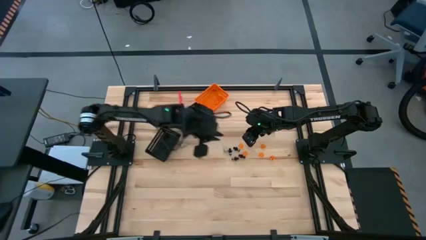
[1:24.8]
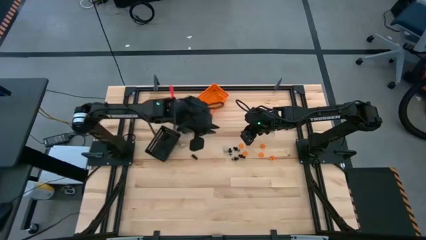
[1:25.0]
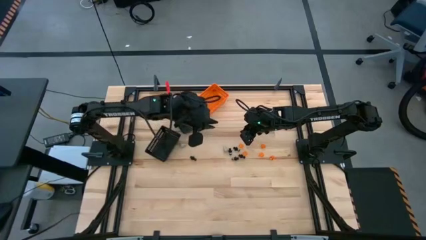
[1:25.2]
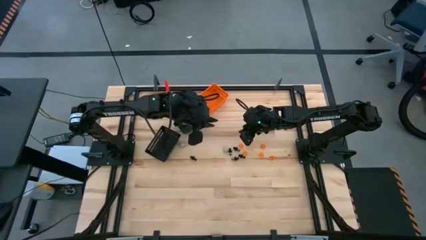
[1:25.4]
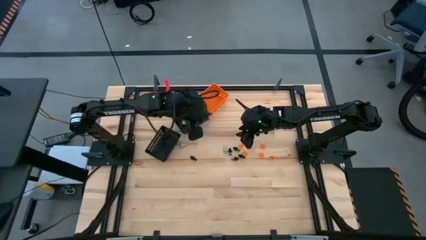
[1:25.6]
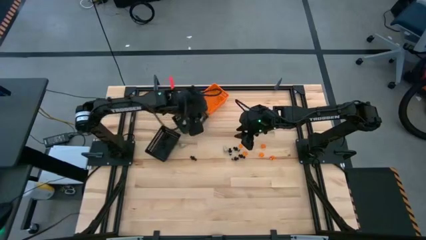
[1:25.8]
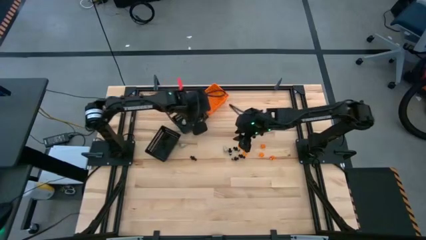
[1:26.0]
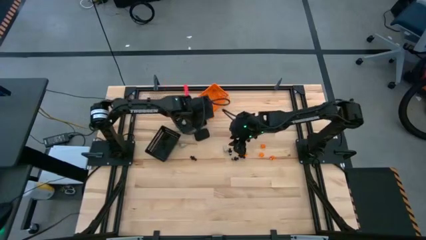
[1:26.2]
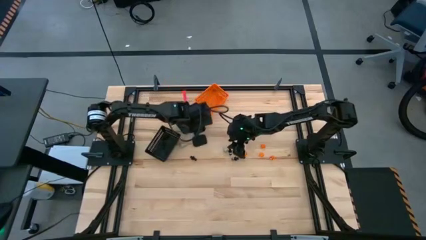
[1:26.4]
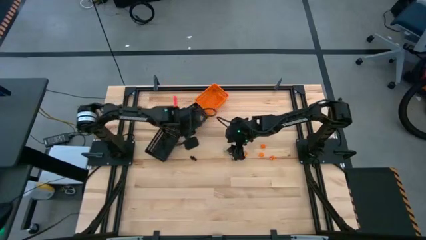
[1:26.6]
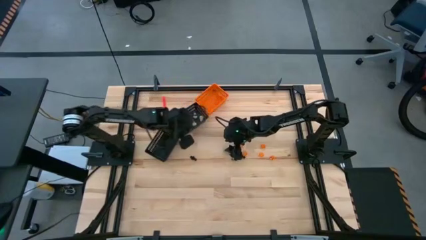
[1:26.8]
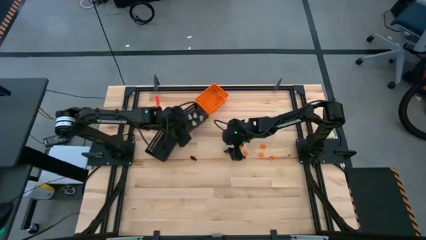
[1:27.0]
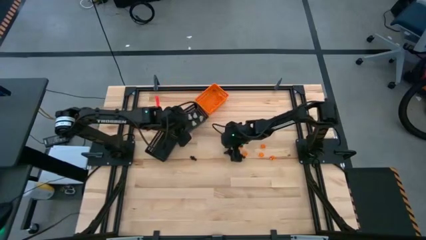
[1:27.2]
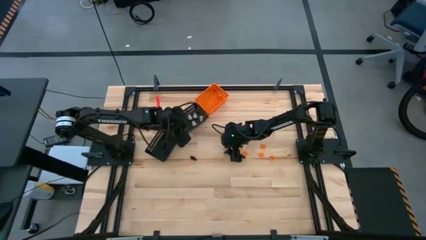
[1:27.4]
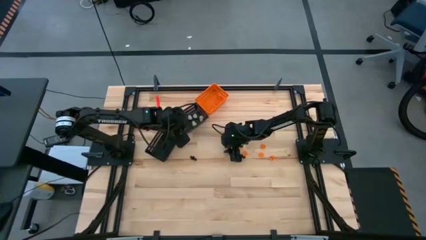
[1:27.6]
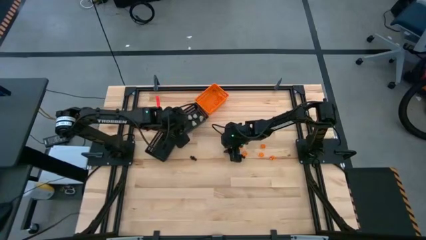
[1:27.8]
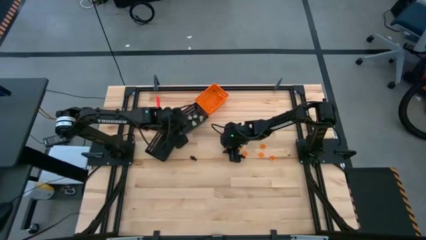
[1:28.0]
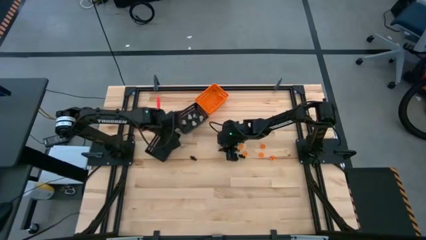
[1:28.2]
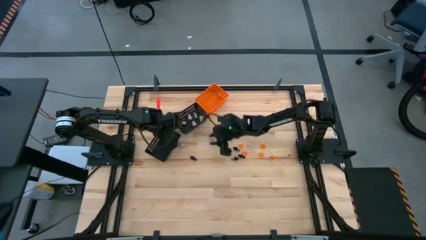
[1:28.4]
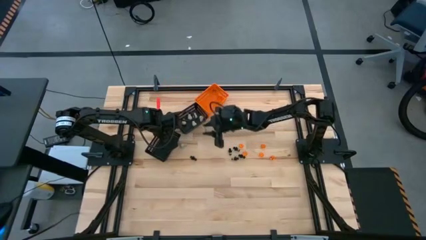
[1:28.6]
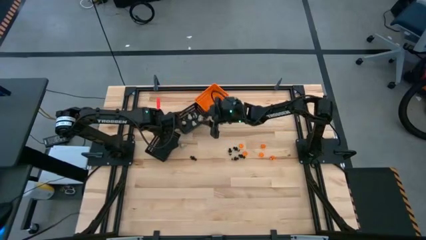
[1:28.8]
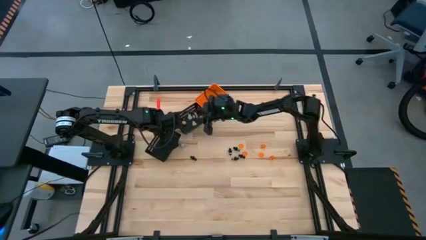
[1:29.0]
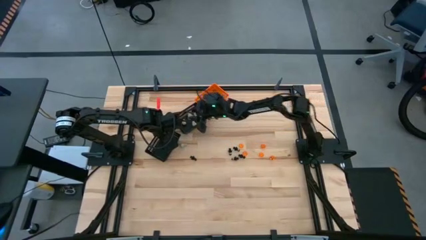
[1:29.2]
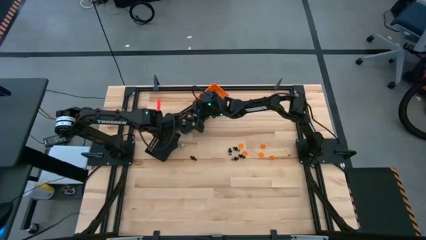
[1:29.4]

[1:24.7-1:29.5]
Task: Sort Halloween decoration
Put the white skull toy into the top black bin

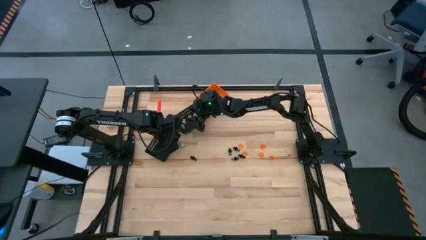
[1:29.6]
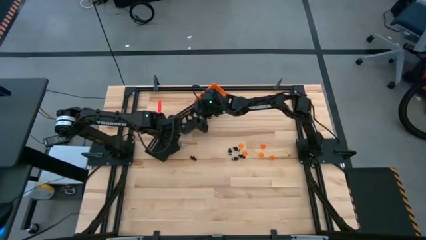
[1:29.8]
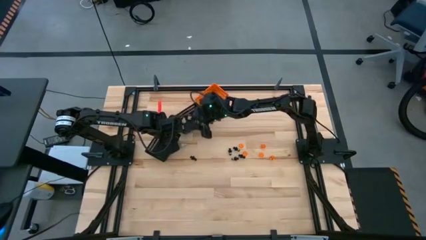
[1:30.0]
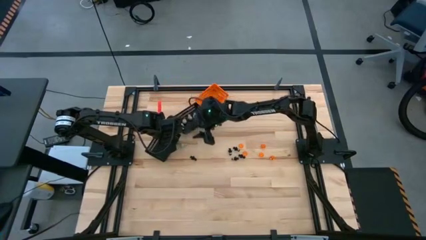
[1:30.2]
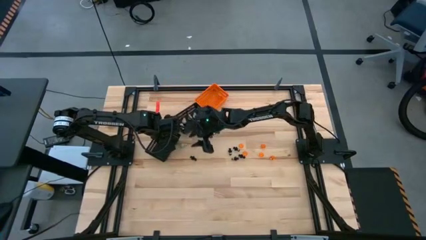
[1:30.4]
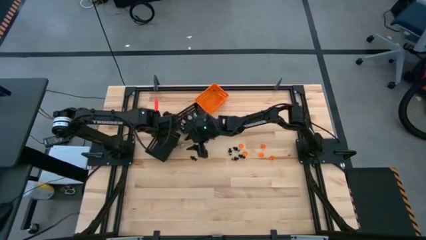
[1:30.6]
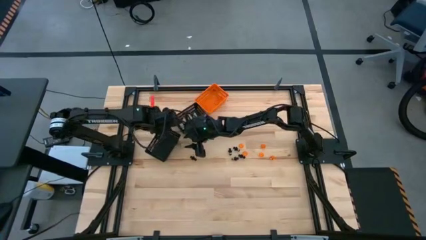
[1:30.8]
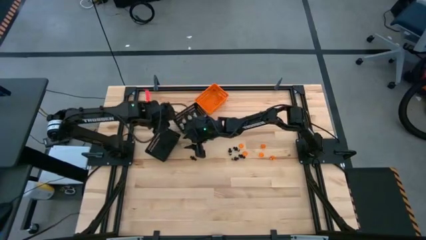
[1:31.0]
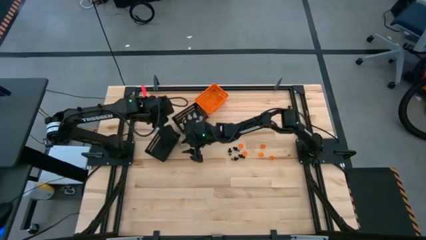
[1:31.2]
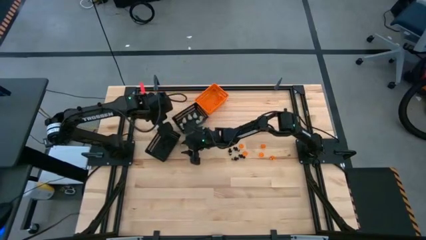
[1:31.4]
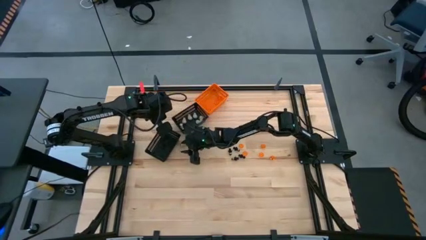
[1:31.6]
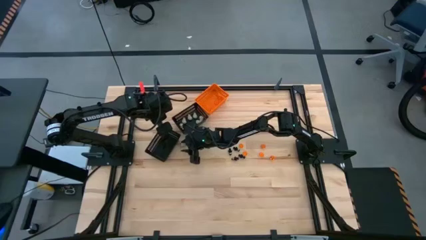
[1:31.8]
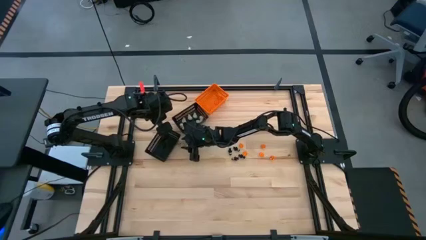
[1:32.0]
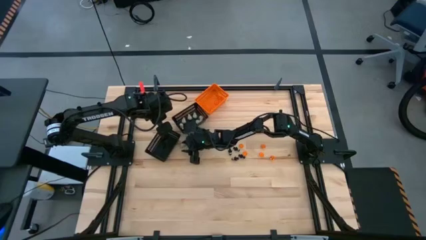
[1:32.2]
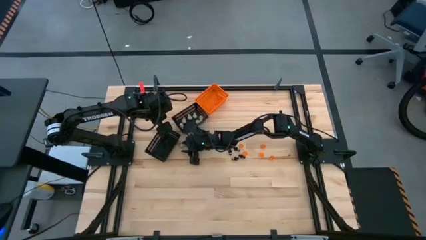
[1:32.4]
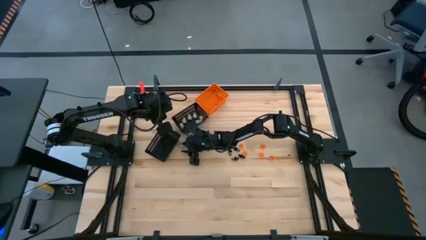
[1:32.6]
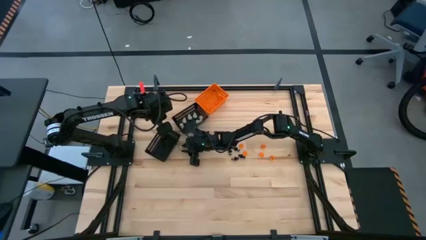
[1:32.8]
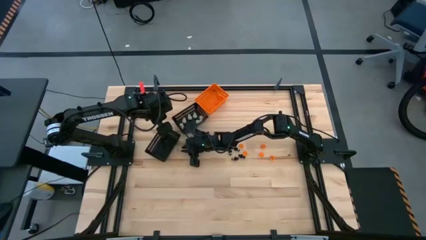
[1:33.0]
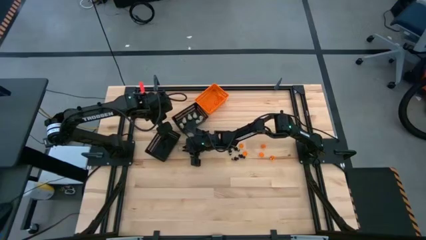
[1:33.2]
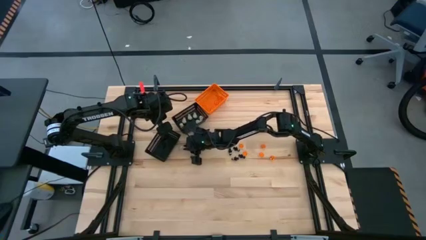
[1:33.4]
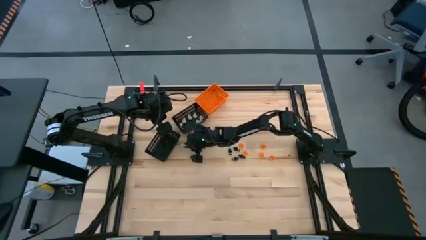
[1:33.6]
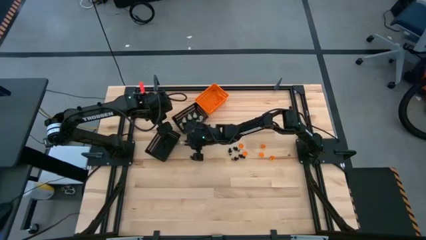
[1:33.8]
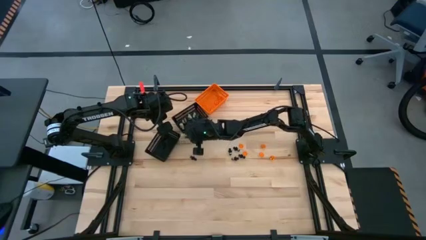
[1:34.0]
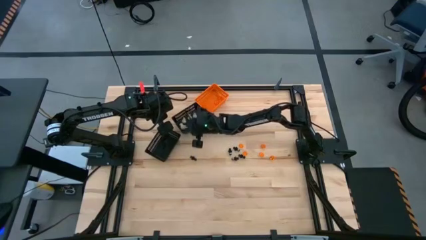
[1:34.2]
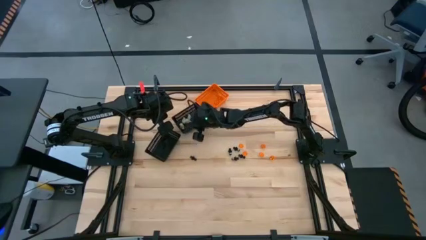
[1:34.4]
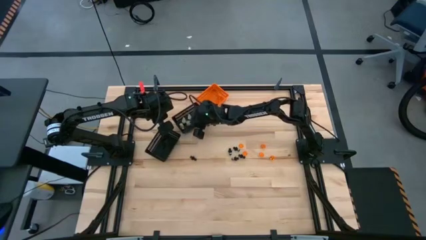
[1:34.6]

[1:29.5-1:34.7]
Put the white skull toy into the top black bin

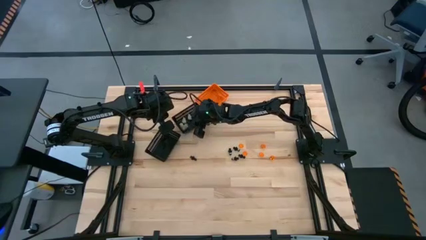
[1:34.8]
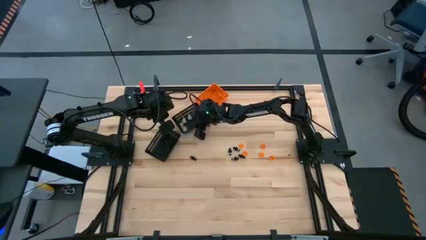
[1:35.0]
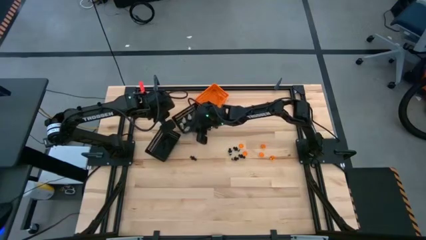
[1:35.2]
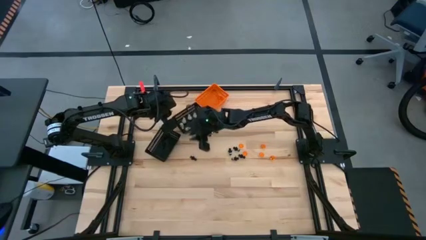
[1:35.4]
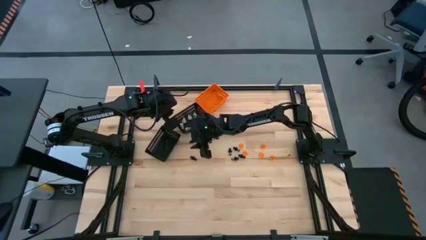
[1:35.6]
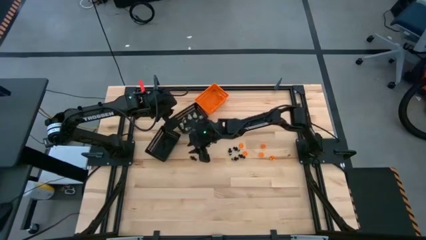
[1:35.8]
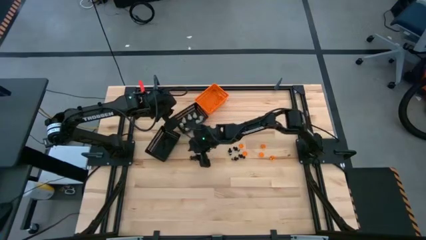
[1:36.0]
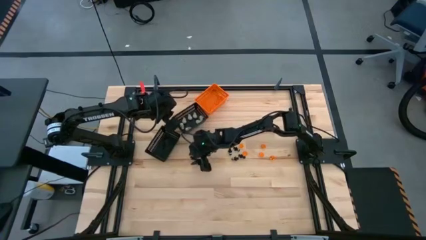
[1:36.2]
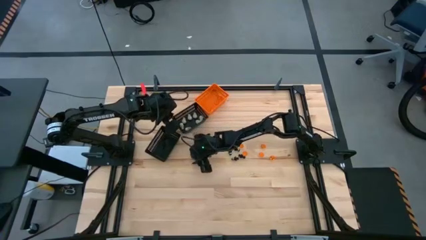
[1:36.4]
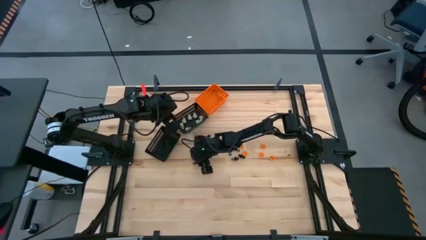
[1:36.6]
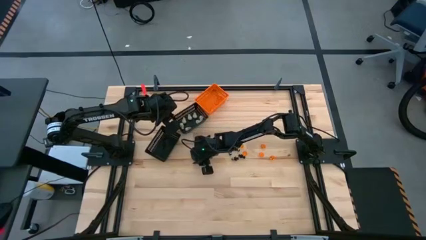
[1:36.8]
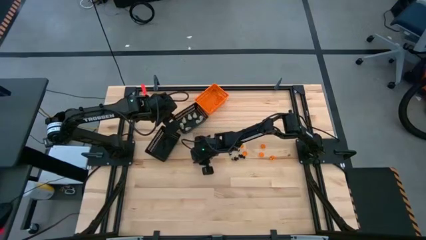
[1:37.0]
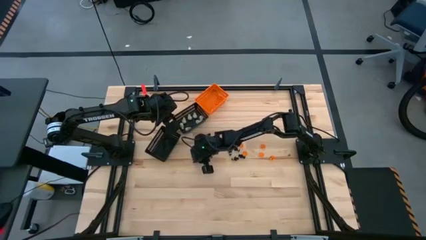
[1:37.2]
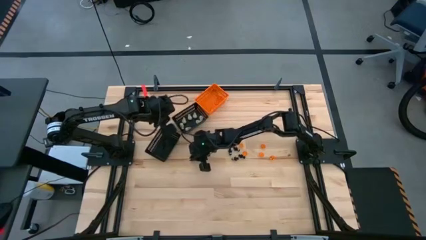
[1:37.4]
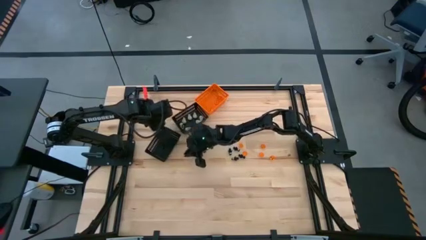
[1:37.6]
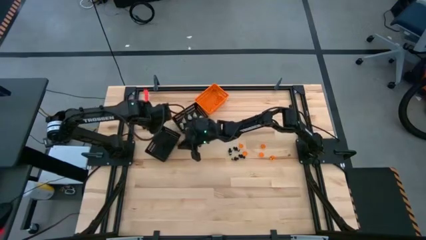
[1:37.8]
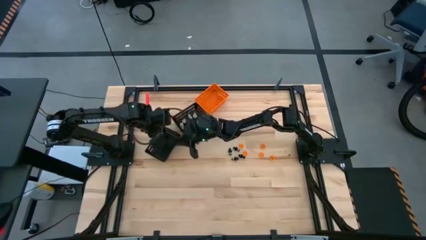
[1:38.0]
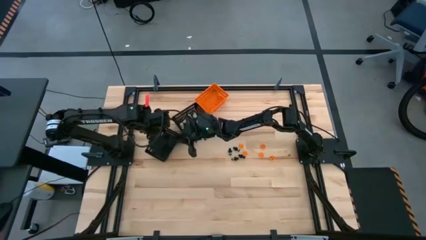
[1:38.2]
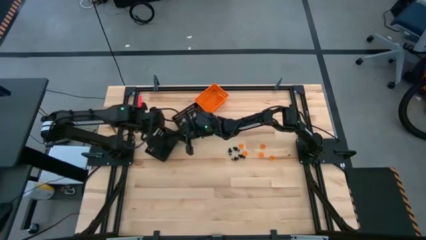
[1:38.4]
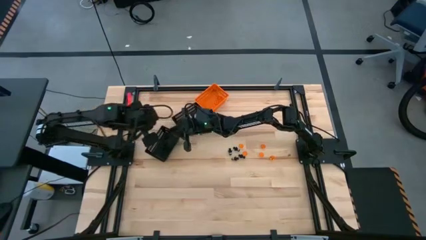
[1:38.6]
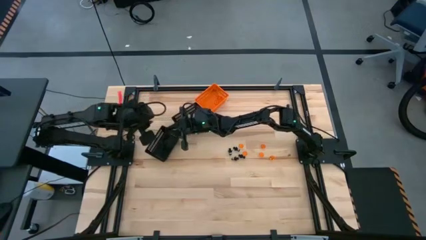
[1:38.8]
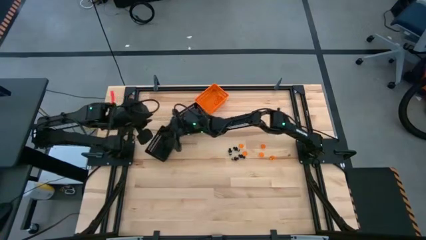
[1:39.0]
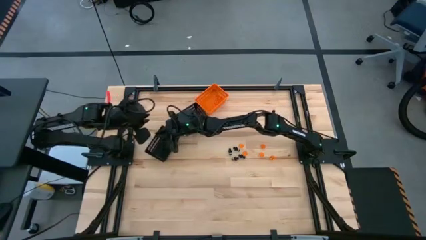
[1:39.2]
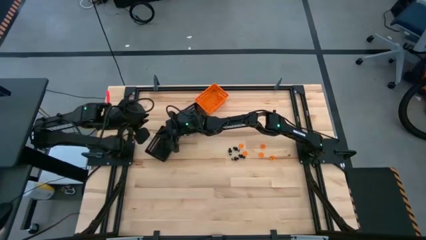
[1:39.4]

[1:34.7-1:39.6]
Put the black voodoo toy into the bottom black bin
